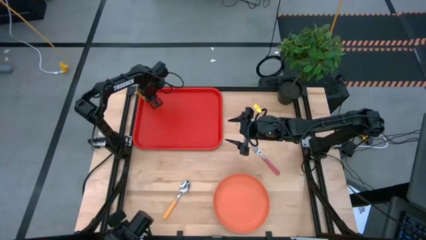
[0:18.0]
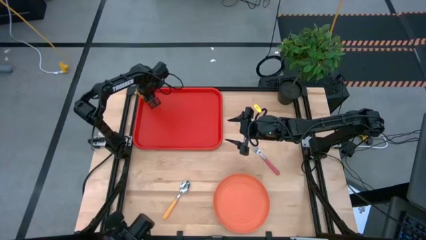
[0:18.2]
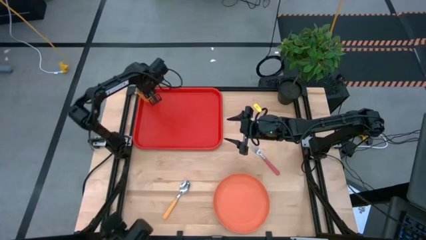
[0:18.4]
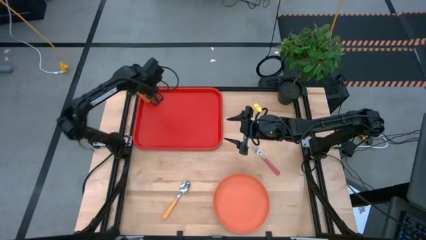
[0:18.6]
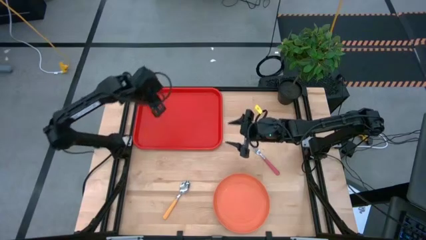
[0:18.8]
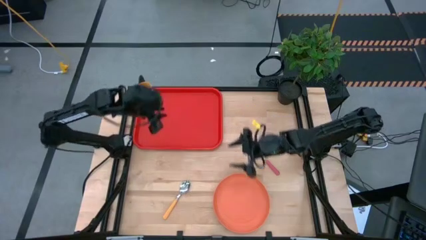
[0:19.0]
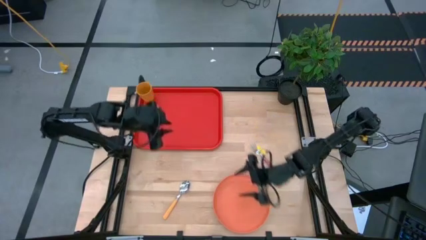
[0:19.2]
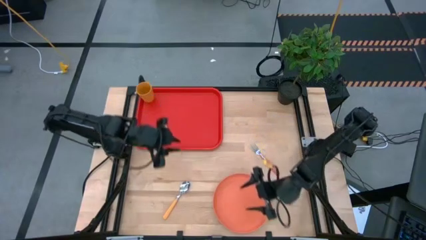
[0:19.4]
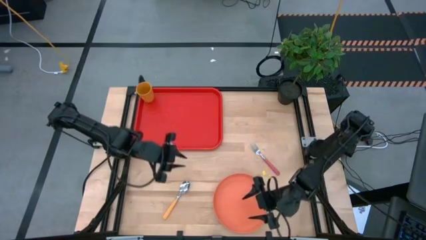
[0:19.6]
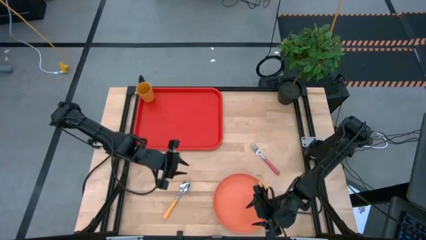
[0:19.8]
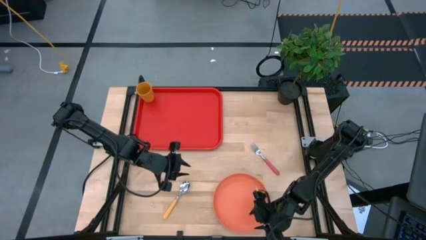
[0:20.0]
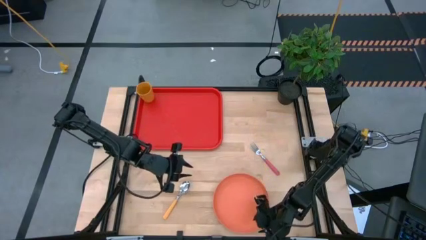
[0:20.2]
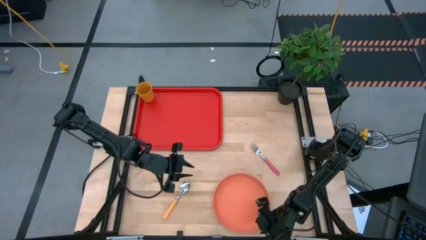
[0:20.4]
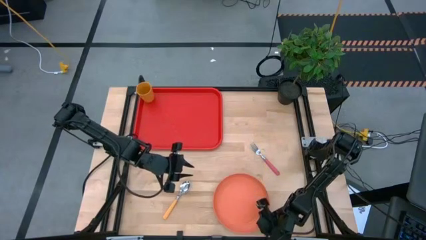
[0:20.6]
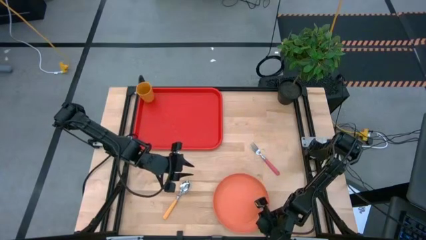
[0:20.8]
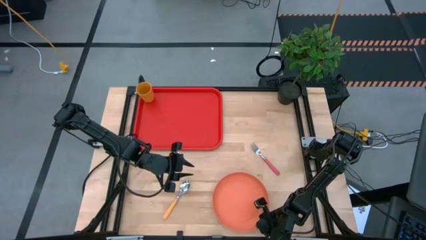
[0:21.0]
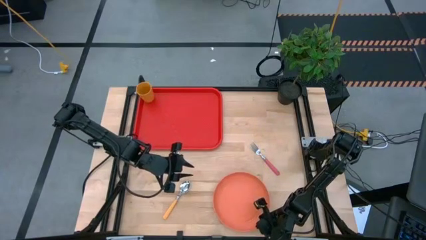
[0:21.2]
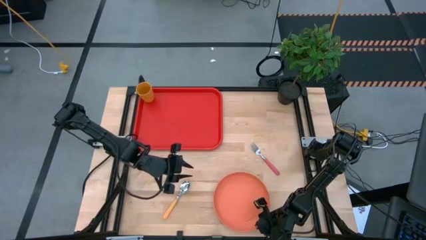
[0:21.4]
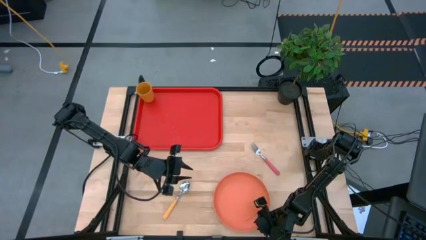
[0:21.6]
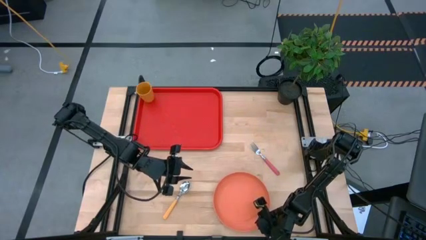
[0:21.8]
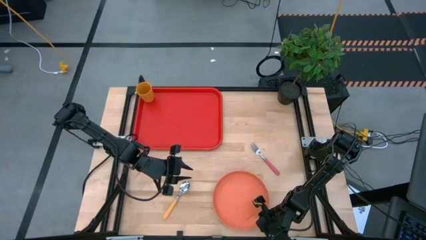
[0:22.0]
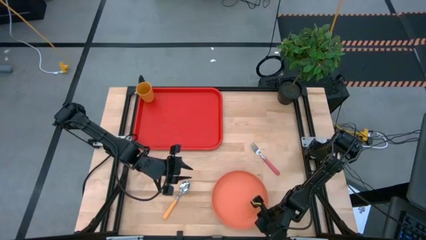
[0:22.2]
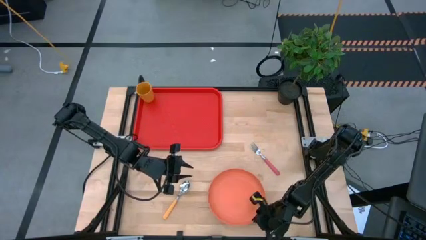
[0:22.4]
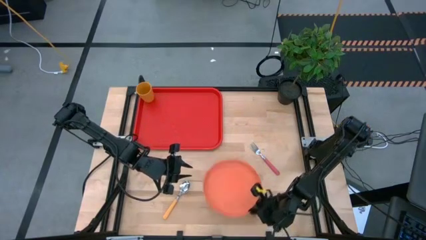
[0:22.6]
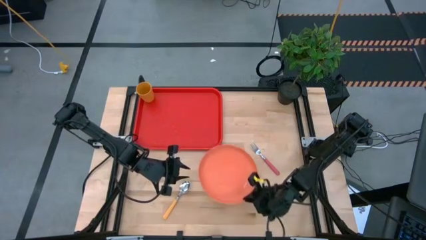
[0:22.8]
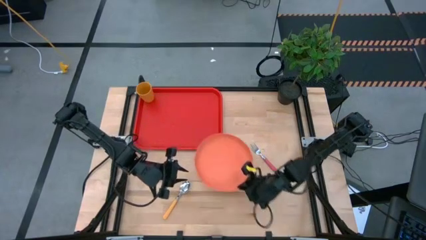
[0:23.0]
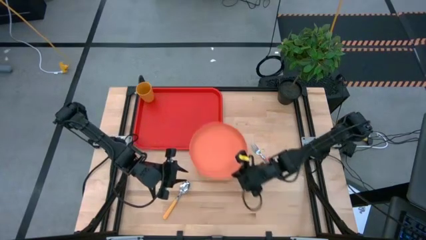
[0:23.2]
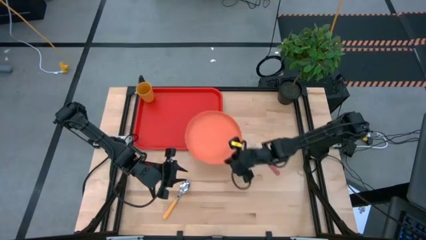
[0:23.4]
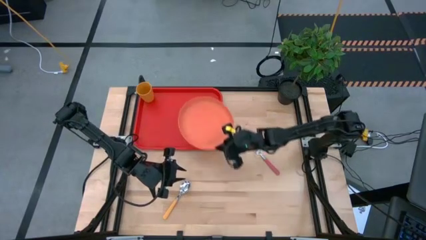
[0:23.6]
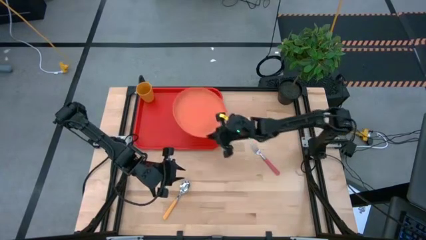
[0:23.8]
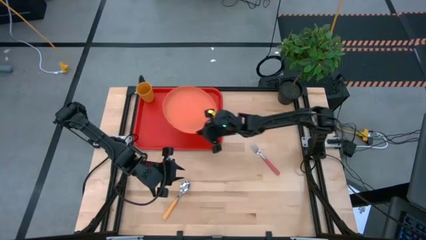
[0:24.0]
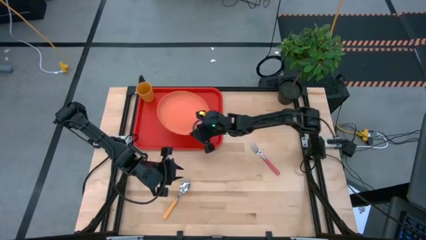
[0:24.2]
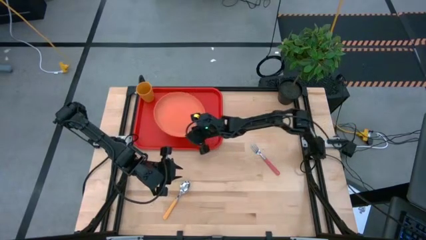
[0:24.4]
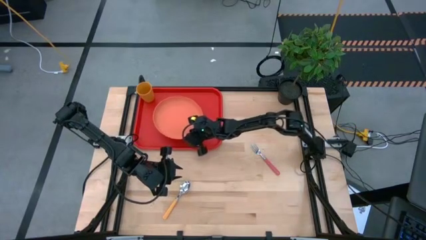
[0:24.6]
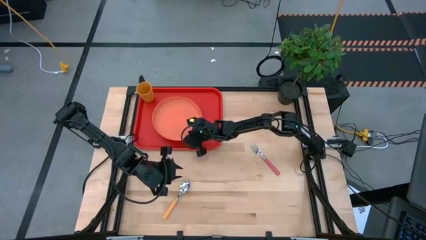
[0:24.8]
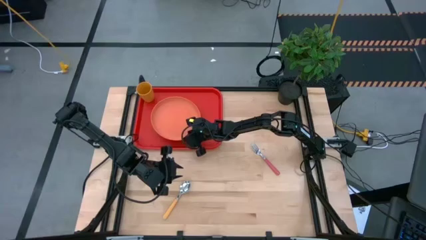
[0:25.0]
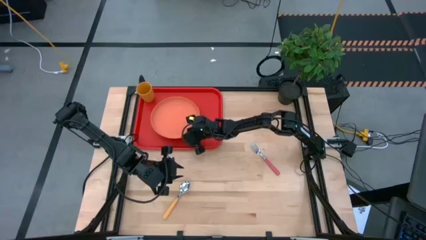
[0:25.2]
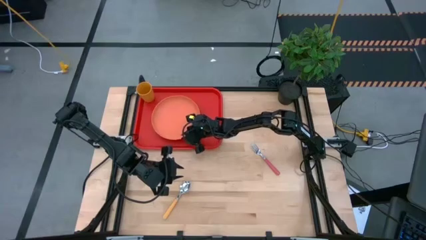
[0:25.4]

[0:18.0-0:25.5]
Task: Pick and place plate/cup/fork/spoon on tray
Put the orange plate on the red serving tray

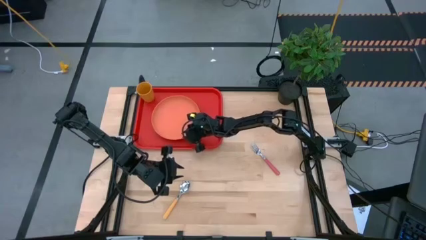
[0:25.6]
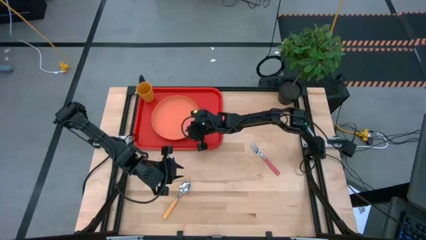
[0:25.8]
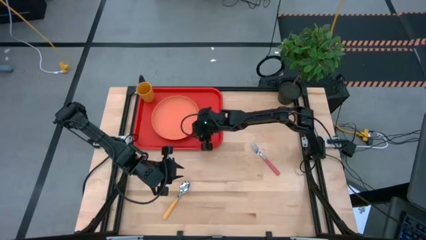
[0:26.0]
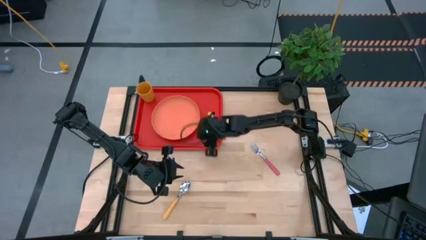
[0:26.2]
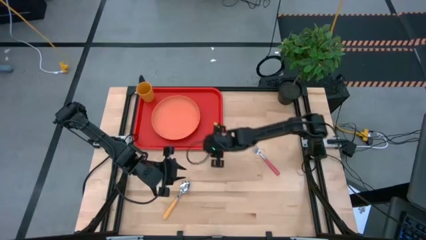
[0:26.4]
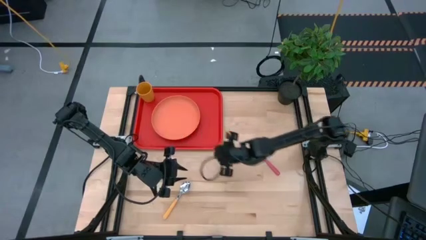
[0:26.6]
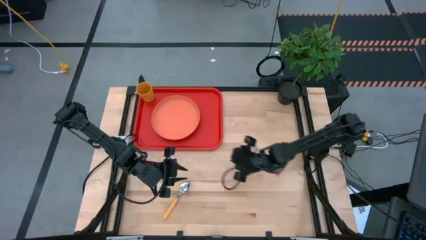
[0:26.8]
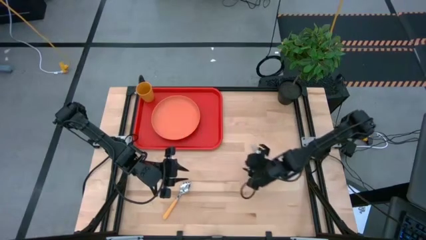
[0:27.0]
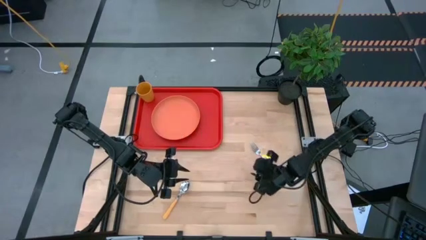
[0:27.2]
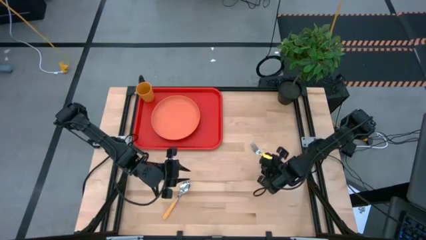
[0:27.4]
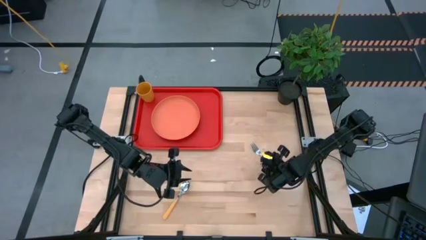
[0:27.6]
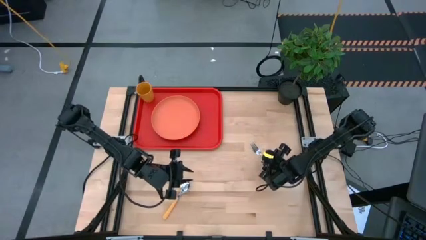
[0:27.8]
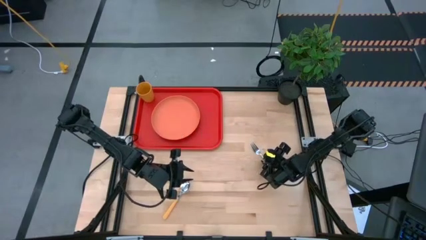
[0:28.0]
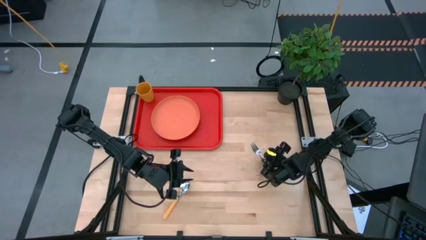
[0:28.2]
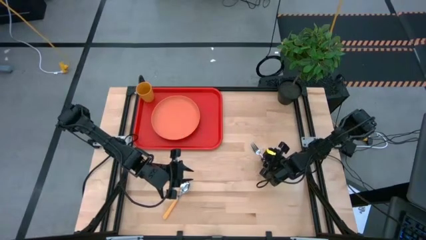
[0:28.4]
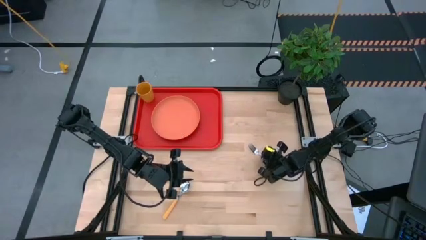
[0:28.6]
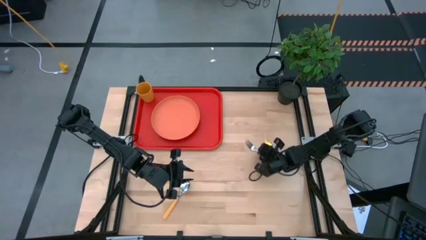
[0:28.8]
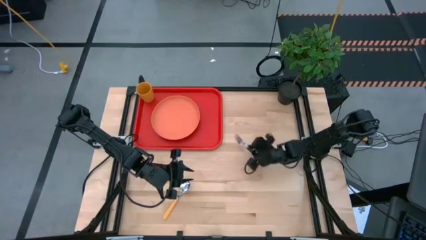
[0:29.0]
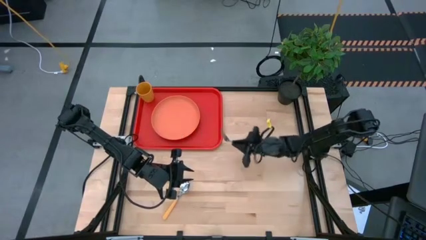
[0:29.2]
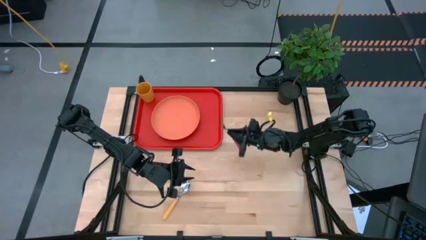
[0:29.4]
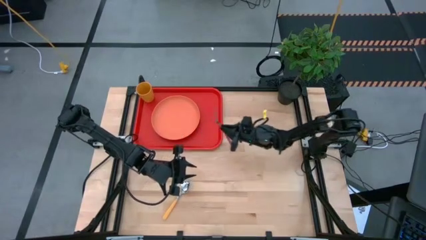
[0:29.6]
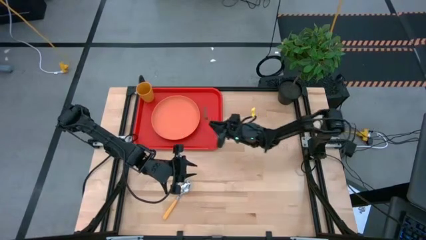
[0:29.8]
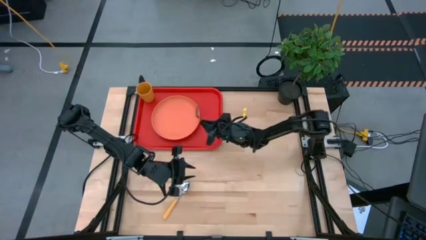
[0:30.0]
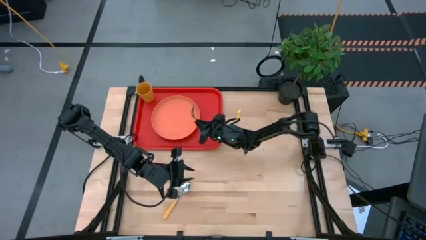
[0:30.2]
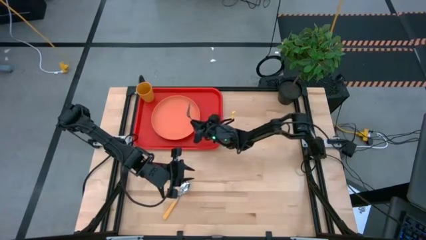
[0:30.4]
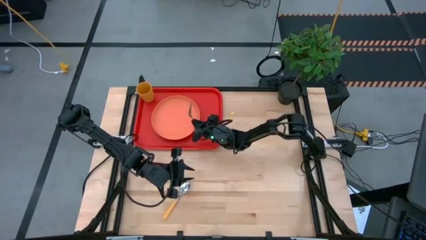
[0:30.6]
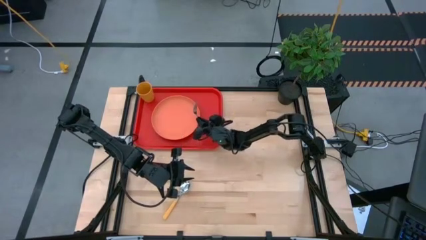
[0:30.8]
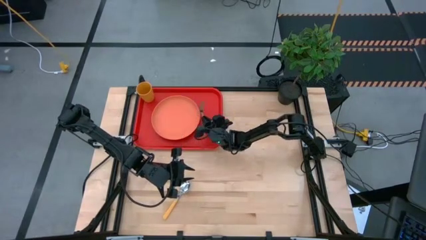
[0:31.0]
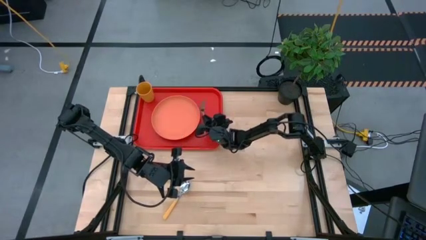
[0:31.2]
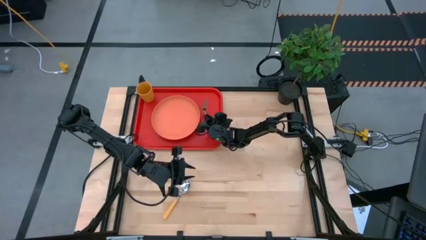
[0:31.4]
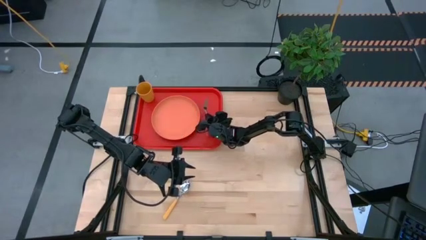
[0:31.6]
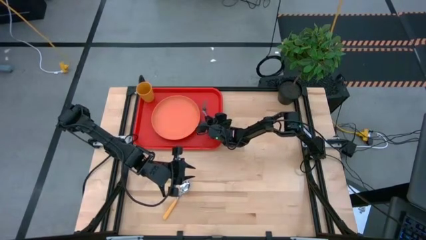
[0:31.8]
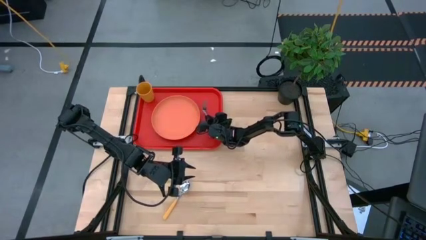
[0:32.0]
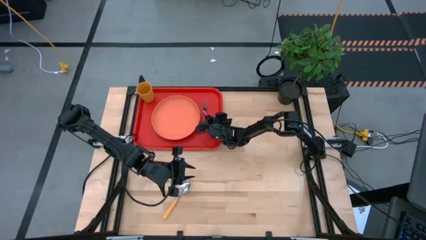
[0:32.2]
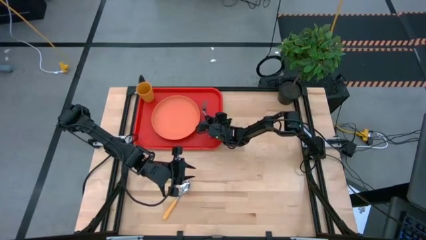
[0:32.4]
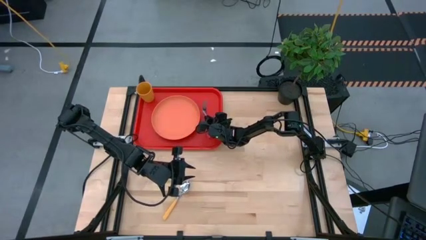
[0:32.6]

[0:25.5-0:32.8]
Put the pink fork on the red serving tray to right of the orange plate

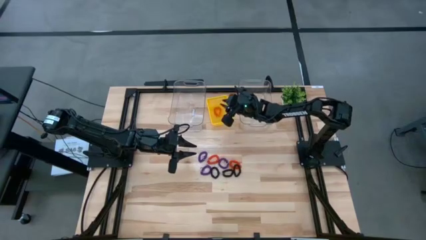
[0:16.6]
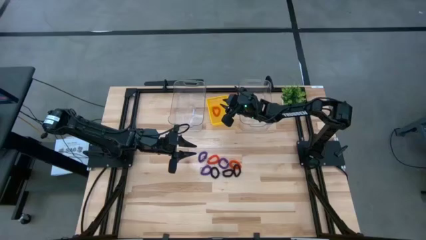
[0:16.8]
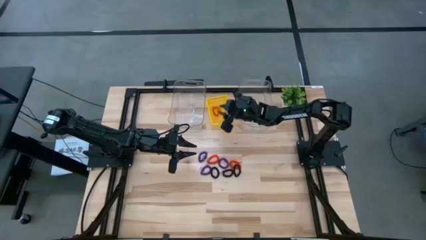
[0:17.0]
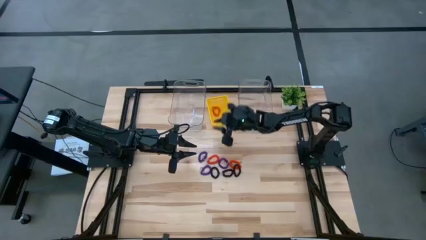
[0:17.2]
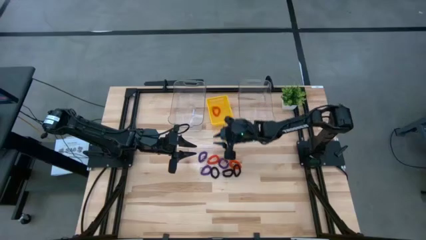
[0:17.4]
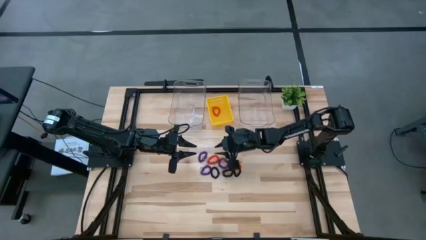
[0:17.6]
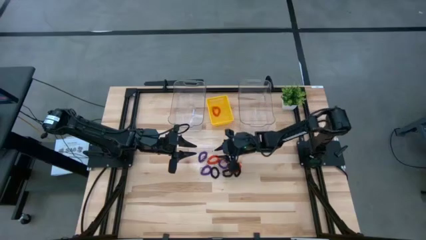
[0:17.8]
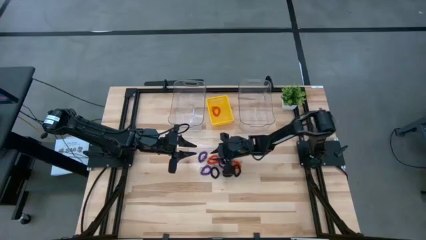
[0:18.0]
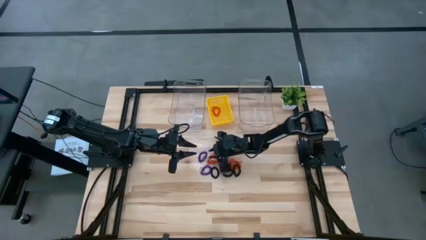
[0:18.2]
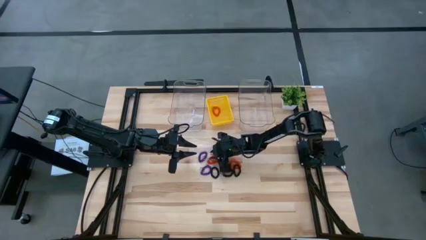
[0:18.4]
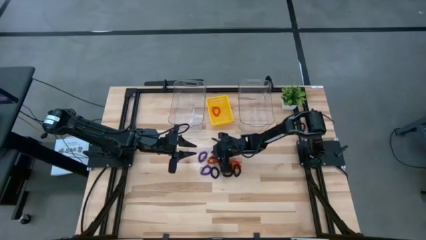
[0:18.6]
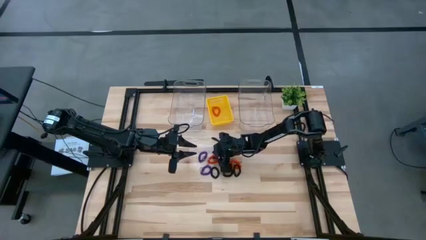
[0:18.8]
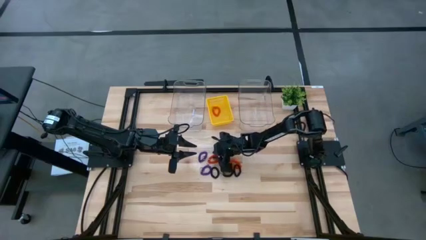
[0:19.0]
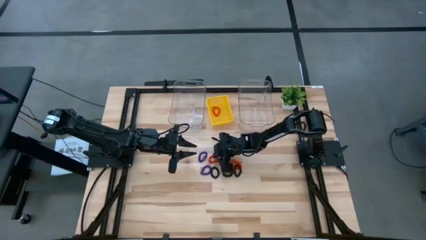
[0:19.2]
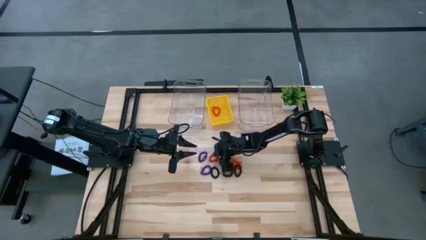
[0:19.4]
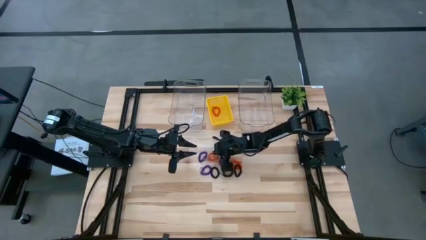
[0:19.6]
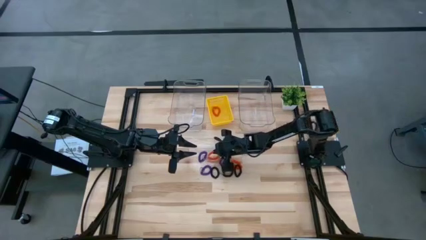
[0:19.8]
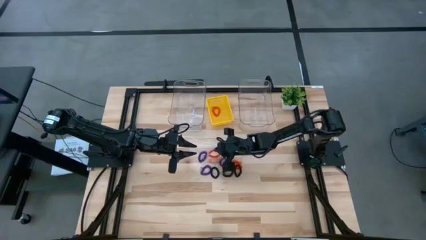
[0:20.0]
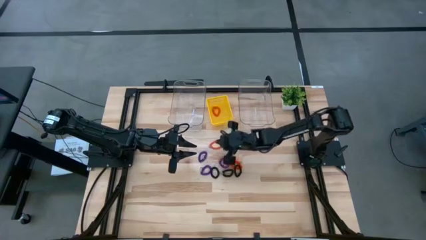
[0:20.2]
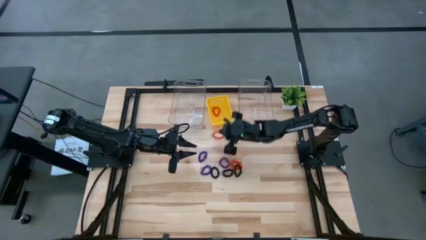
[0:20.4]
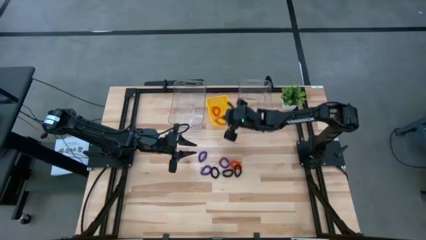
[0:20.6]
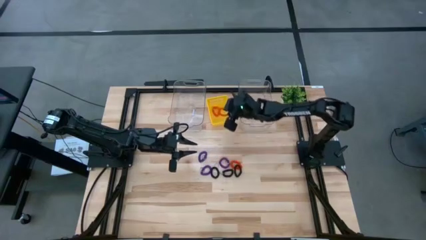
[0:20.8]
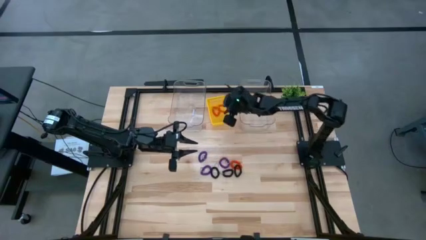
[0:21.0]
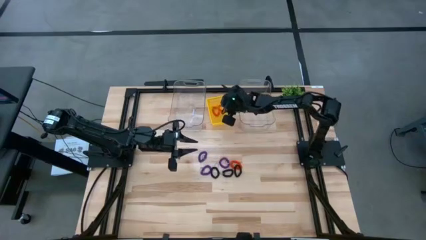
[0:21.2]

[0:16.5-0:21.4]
Task: Sort spring keychains
Put the left orange spring keychain into the yellow bin
